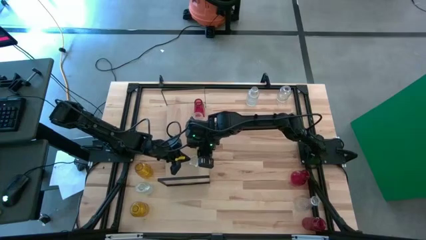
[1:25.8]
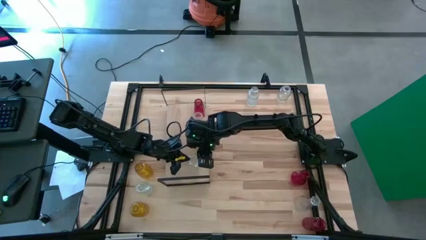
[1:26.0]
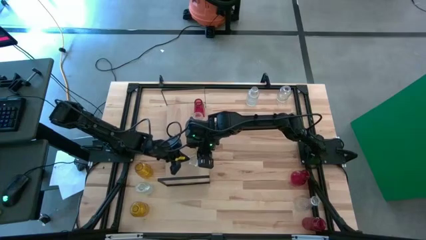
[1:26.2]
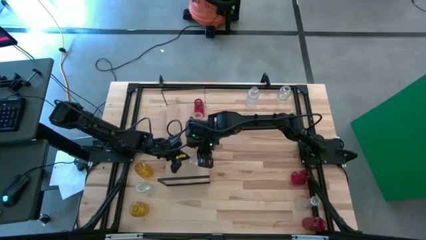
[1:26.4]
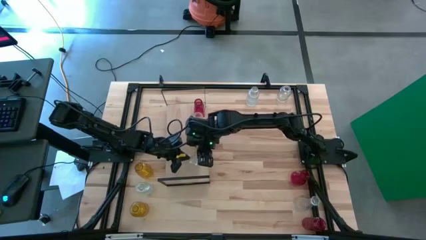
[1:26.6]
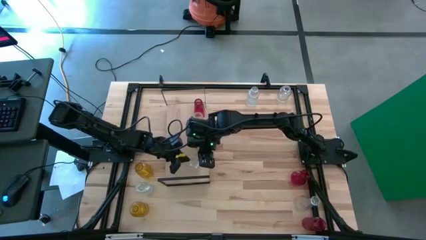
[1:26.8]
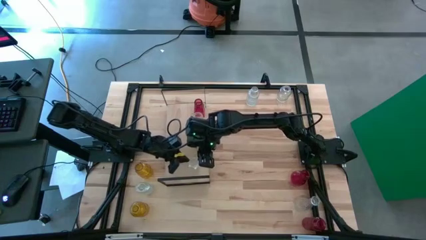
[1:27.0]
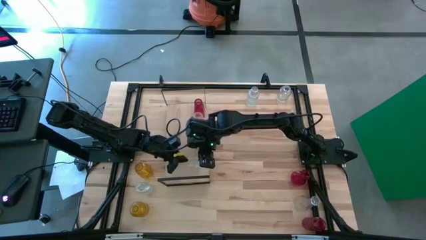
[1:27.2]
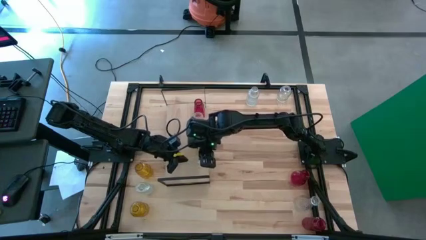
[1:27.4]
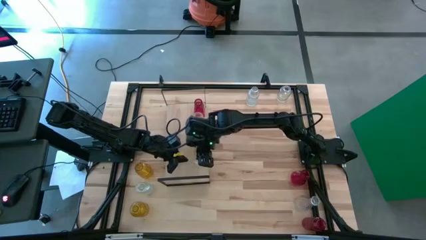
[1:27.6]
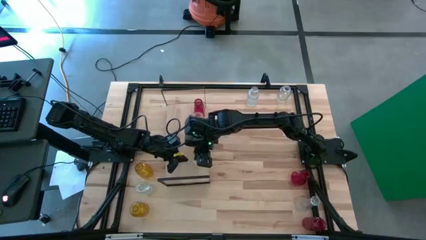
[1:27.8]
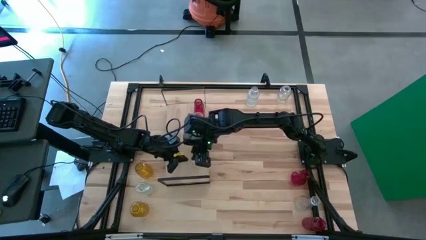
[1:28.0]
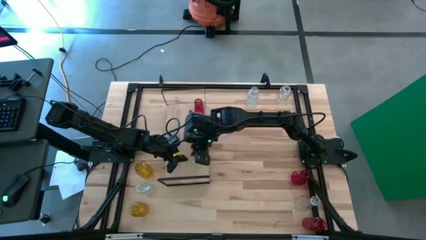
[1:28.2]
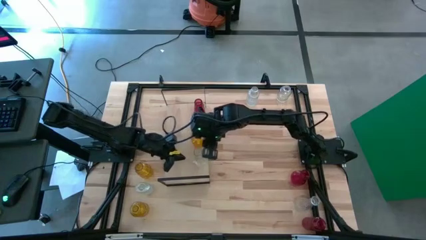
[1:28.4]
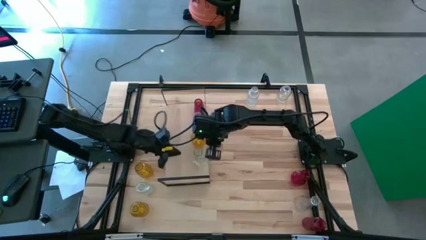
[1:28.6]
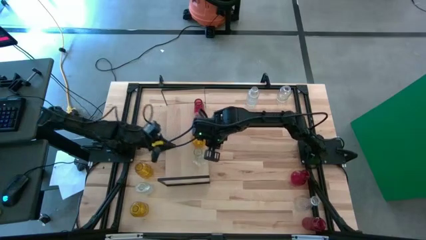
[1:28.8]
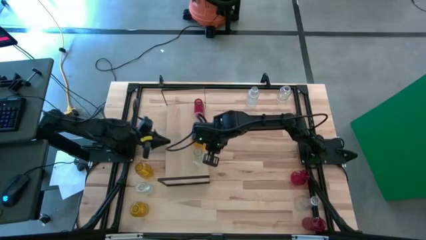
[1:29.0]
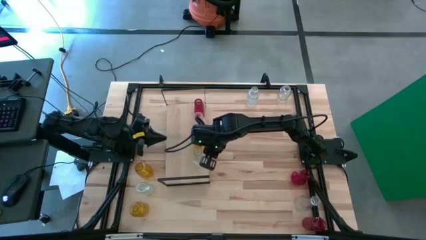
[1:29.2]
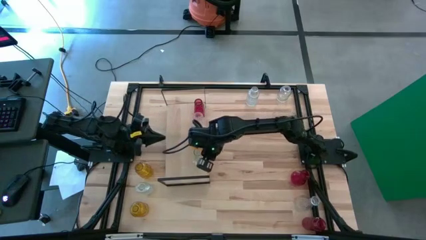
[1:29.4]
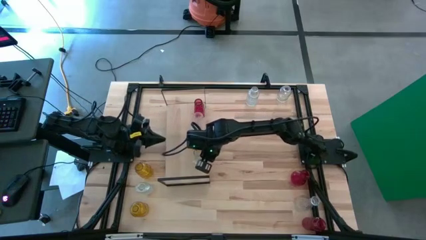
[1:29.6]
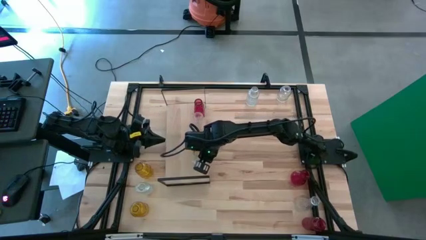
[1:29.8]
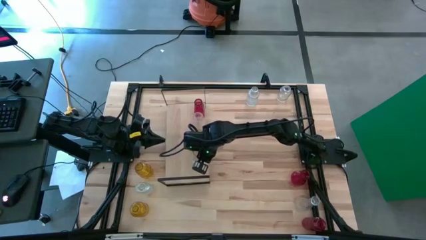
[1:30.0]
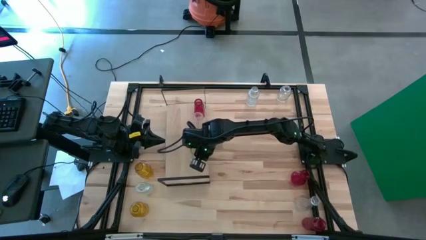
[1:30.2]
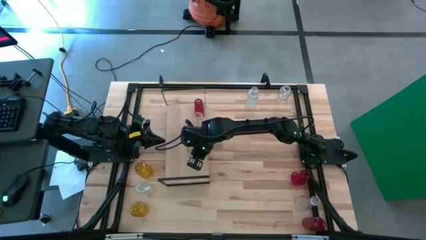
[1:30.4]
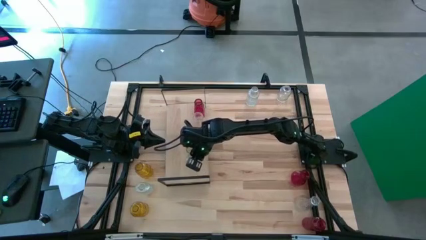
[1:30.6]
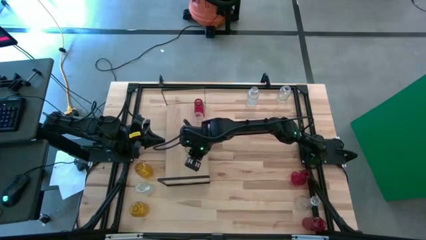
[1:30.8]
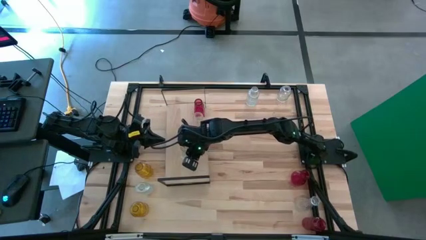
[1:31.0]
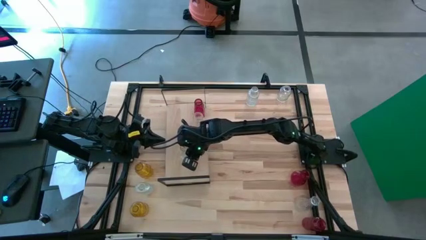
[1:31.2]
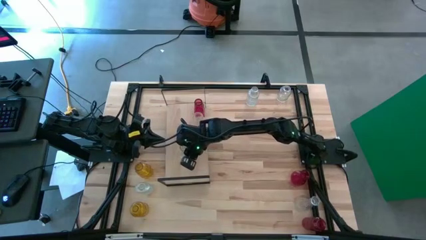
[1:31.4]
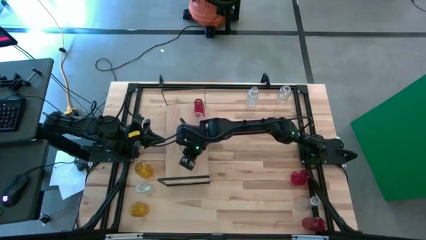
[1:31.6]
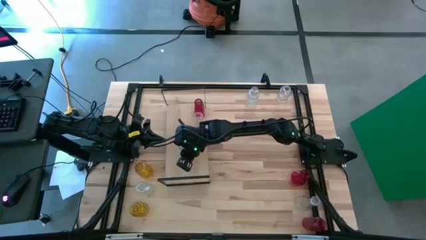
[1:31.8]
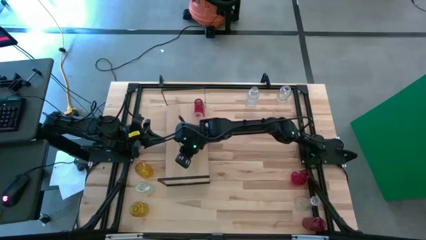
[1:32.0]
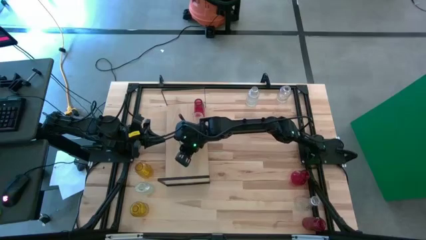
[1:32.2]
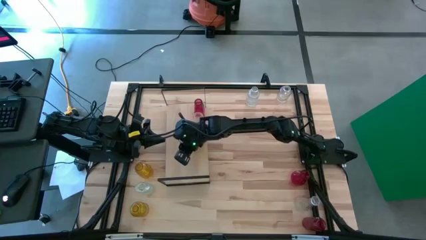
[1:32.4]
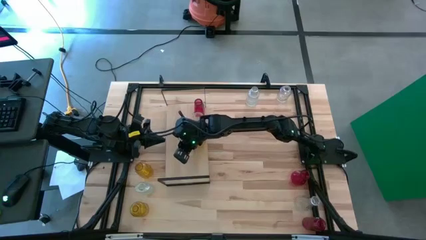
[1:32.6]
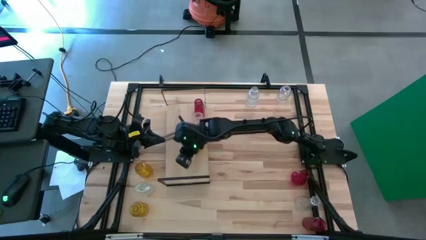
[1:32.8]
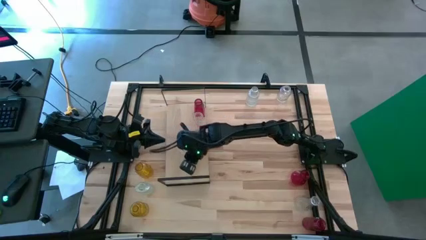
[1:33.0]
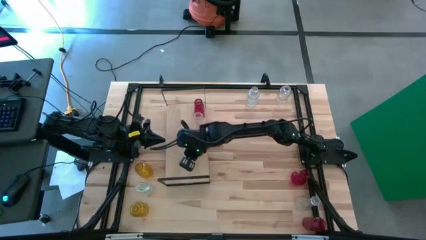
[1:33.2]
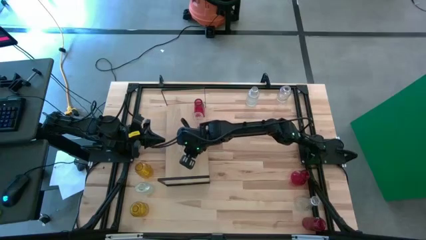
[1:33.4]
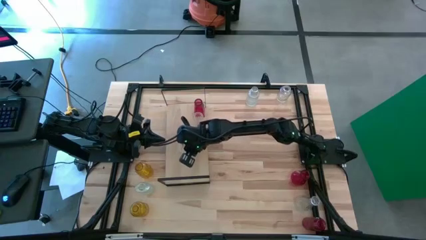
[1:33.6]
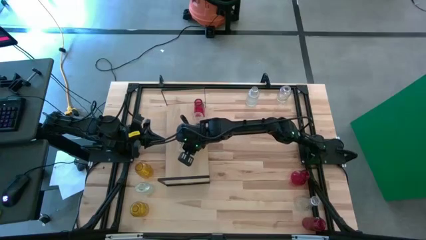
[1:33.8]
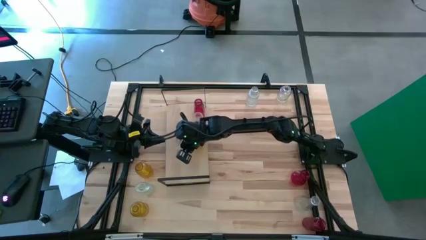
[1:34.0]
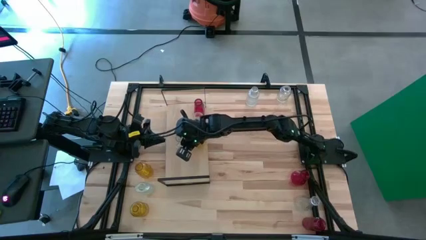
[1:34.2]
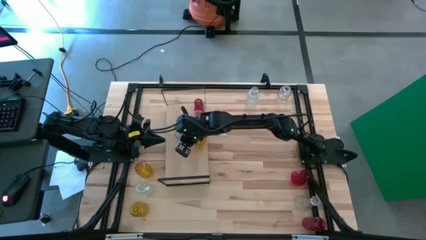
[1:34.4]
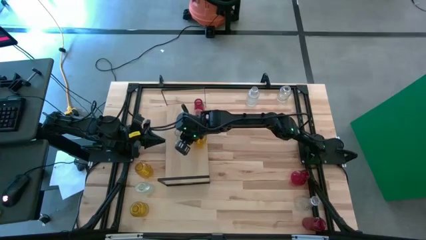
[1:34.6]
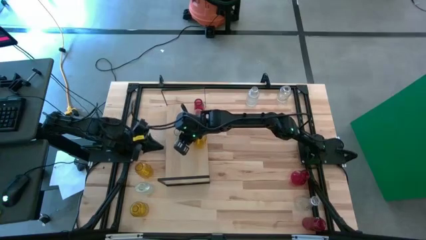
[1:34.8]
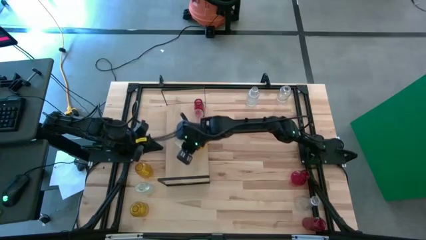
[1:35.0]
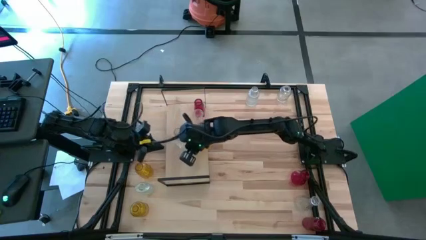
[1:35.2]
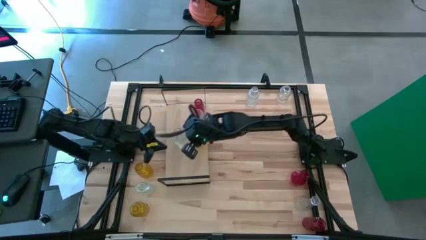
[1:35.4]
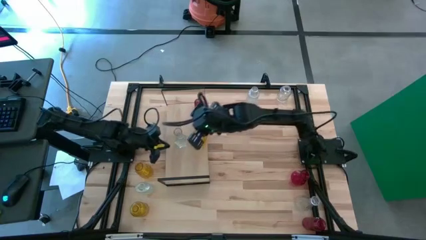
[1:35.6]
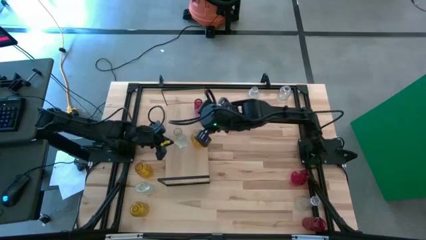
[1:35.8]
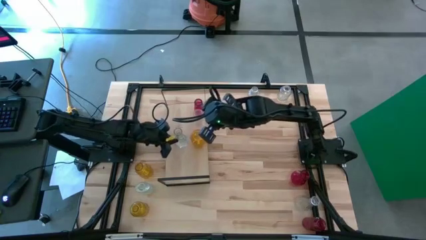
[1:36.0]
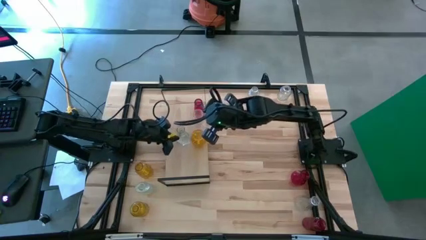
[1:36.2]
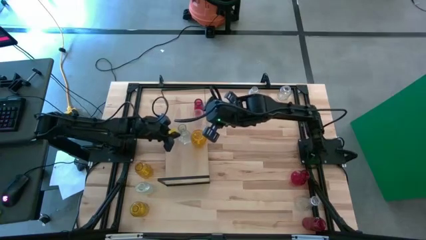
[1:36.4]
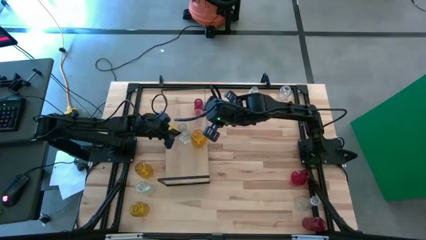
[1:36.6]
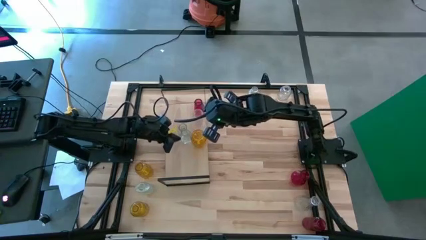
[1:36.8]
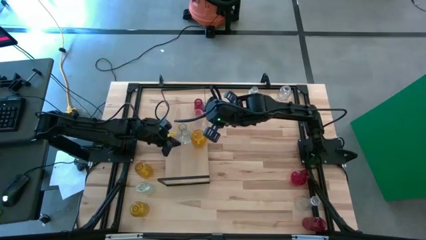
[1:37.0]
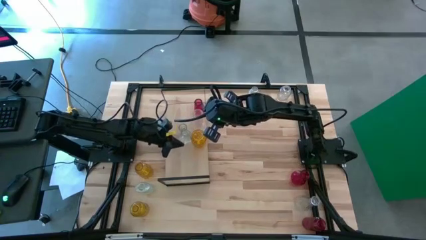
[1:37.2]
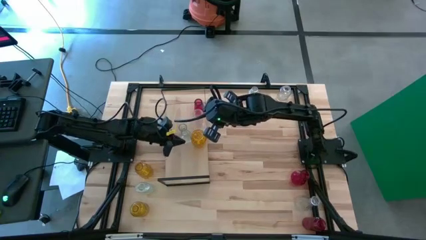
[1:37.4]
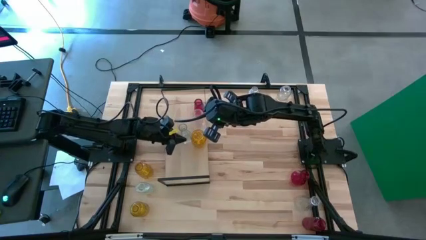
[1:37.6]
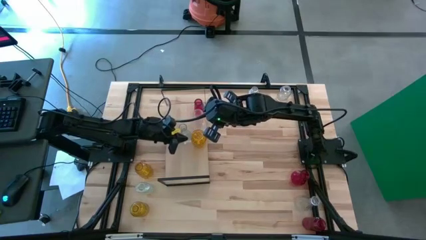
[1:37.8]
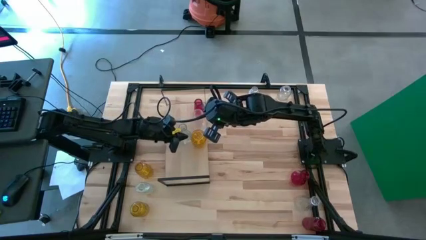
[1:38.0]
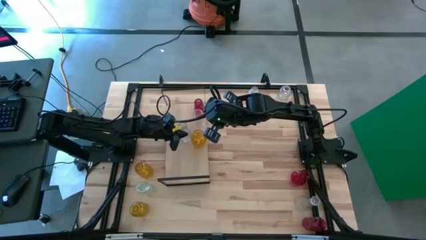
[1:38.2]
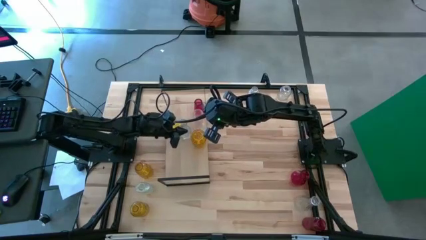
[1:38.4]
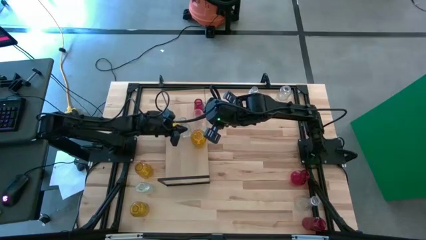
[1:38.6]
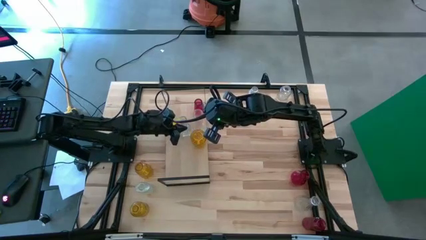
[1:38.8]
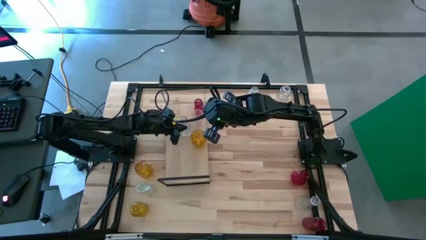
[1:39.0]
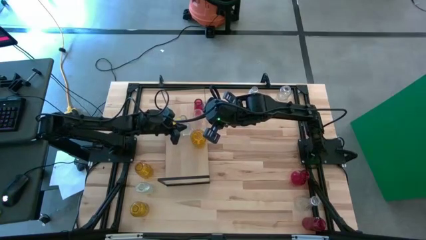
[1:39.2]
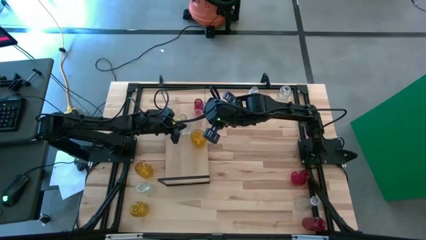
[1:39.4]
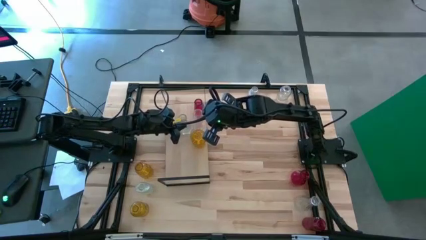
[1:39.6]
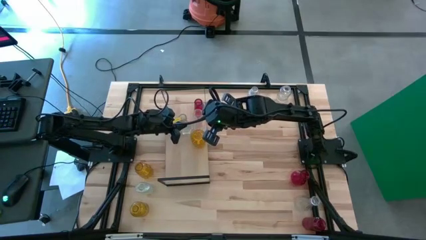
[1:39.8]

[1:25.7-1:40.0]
Task: sort vases onto shelf
Put the transparent vase on the shelf aligned with the other transparent vase
